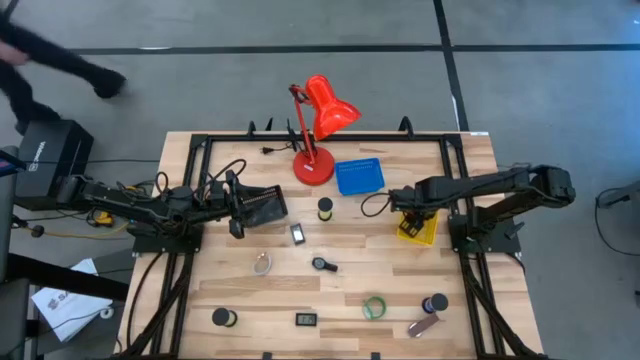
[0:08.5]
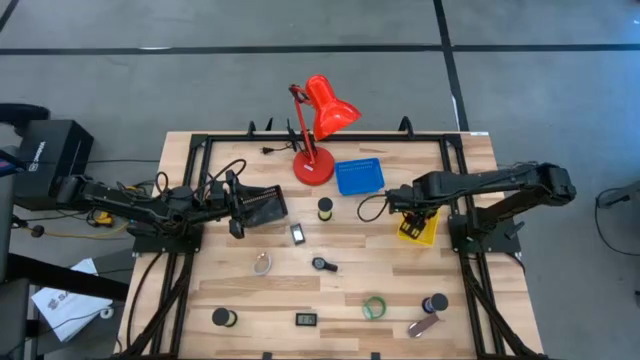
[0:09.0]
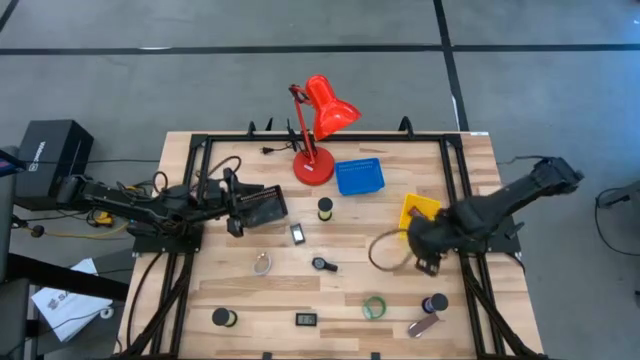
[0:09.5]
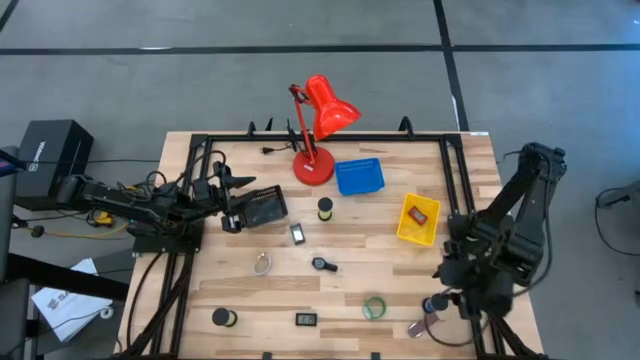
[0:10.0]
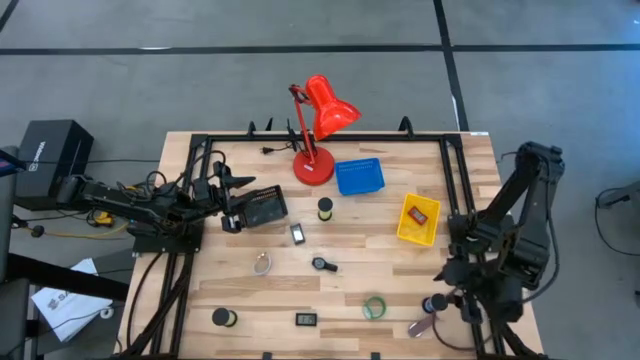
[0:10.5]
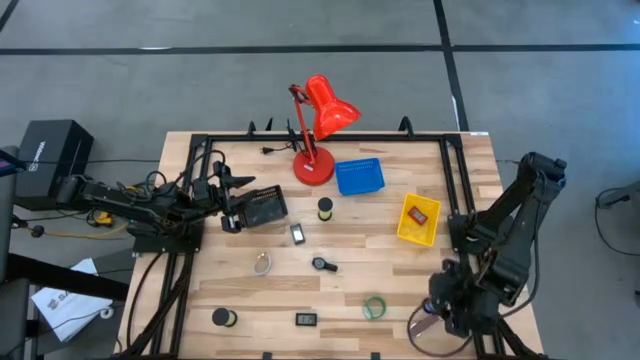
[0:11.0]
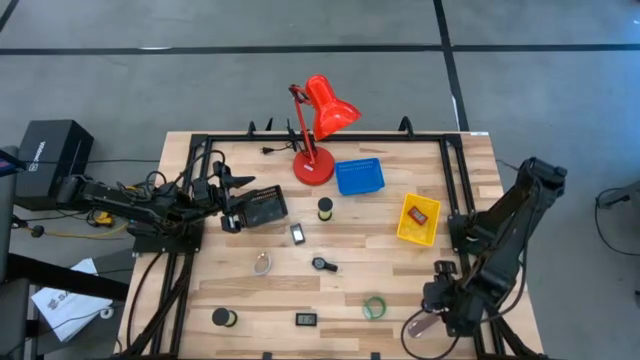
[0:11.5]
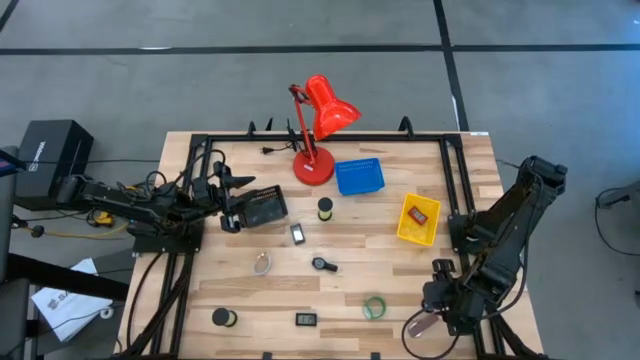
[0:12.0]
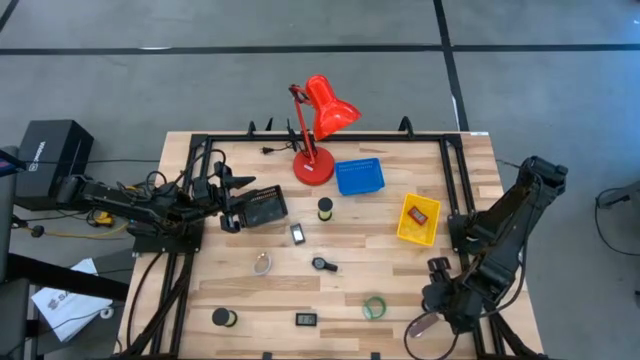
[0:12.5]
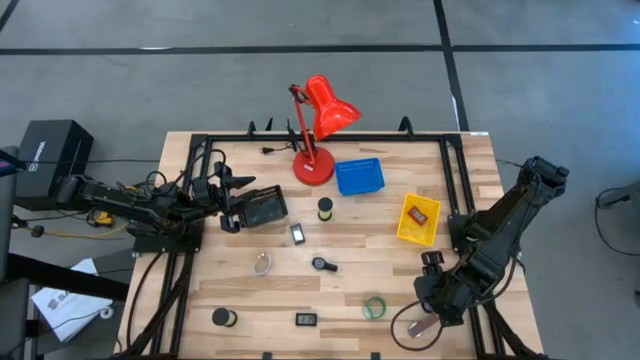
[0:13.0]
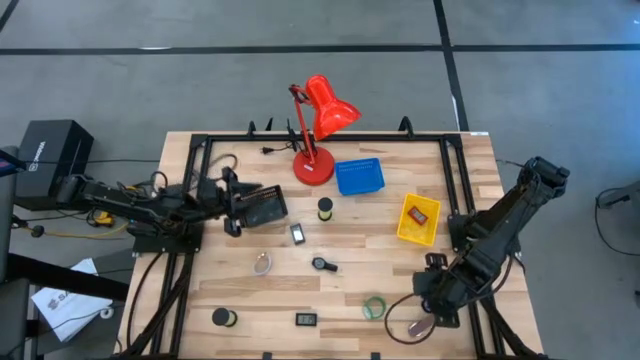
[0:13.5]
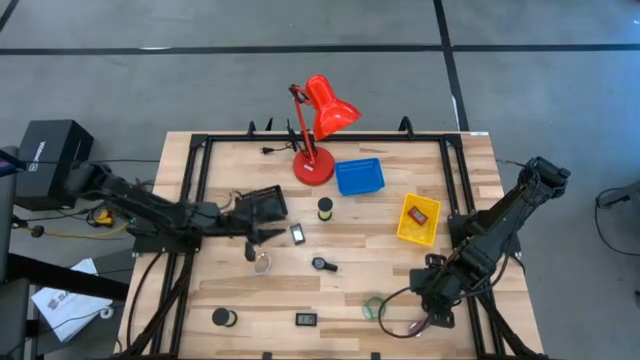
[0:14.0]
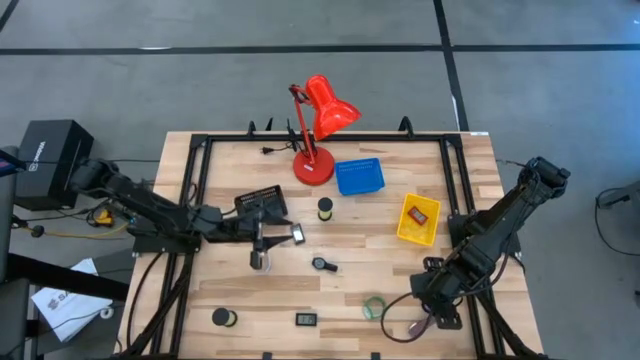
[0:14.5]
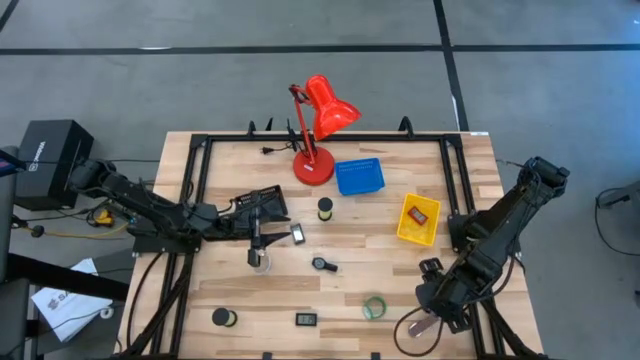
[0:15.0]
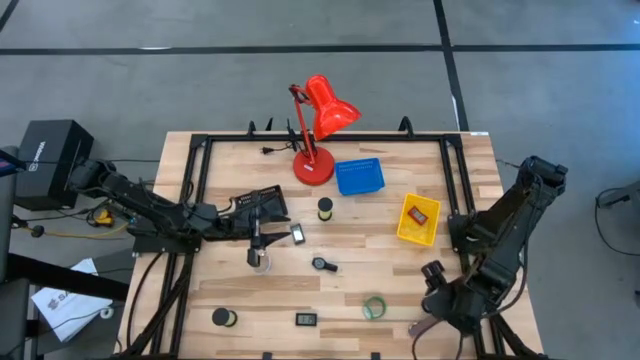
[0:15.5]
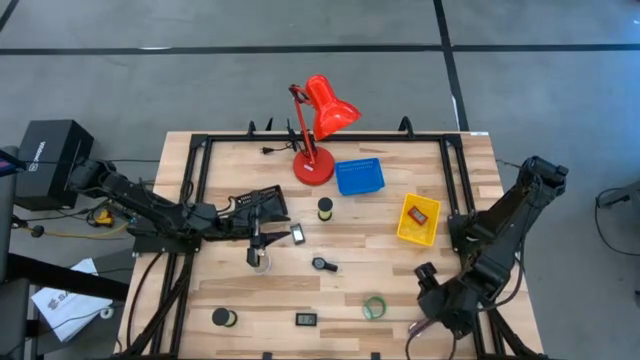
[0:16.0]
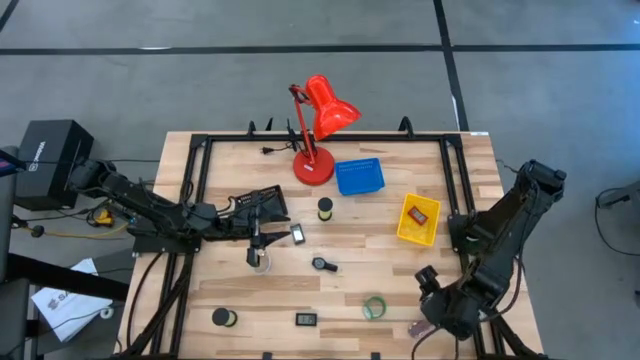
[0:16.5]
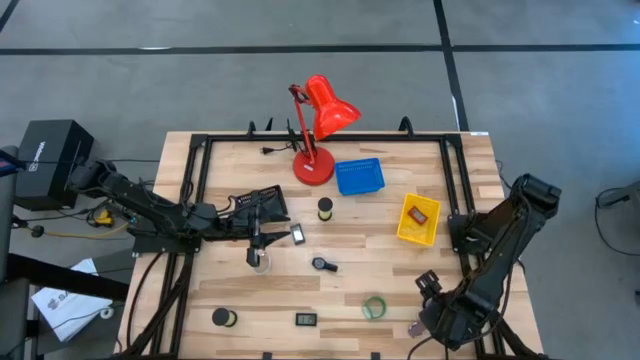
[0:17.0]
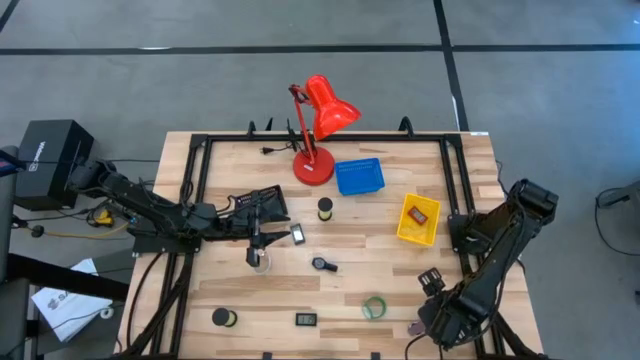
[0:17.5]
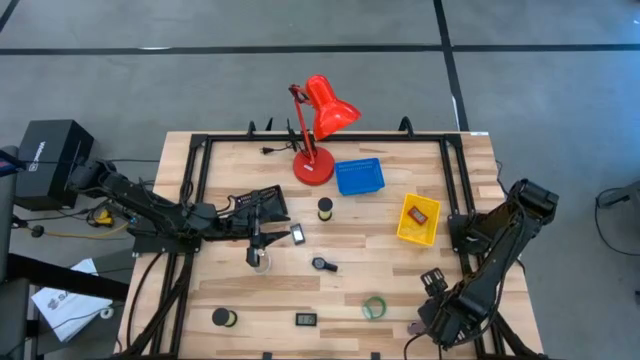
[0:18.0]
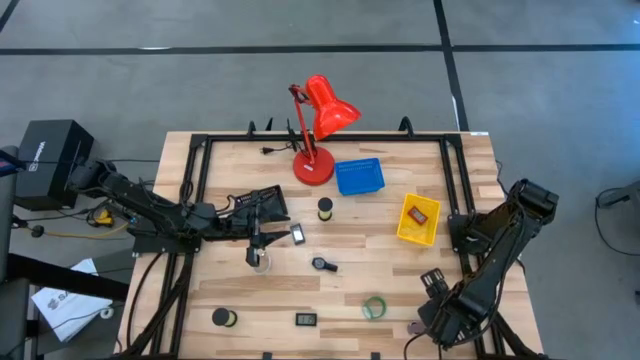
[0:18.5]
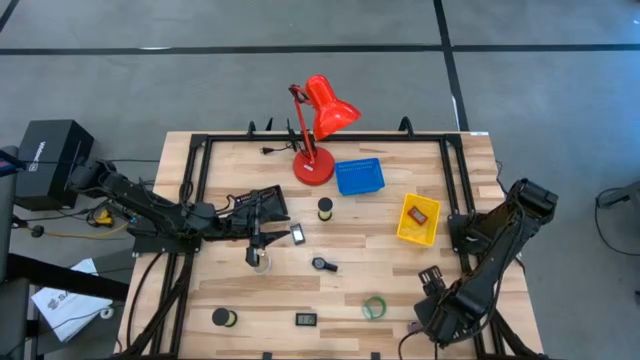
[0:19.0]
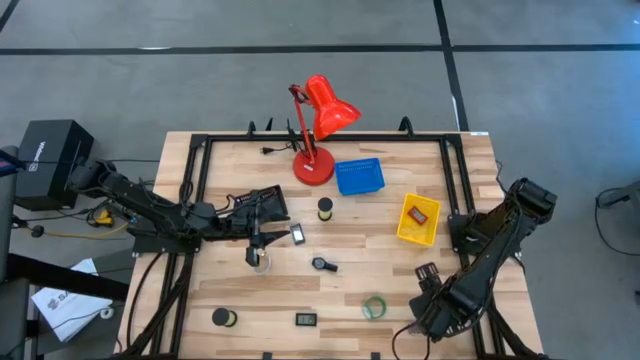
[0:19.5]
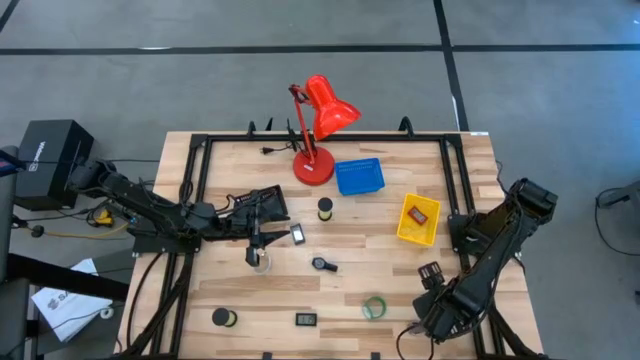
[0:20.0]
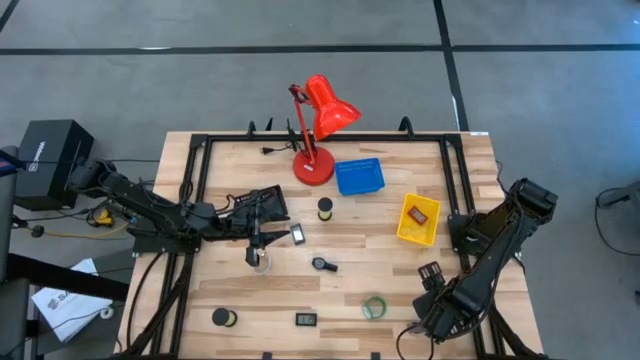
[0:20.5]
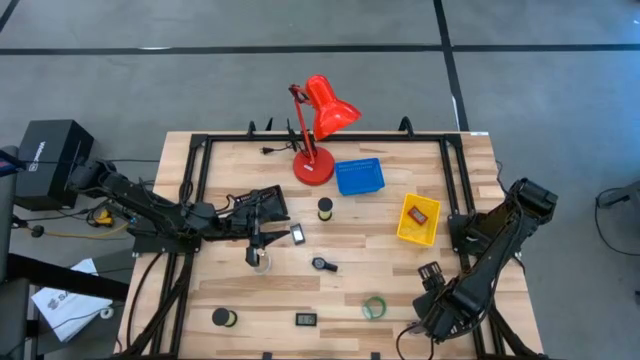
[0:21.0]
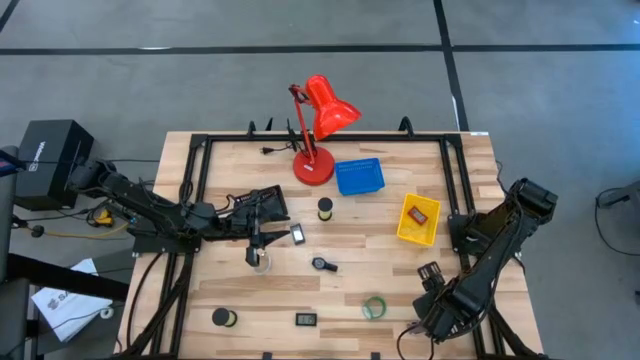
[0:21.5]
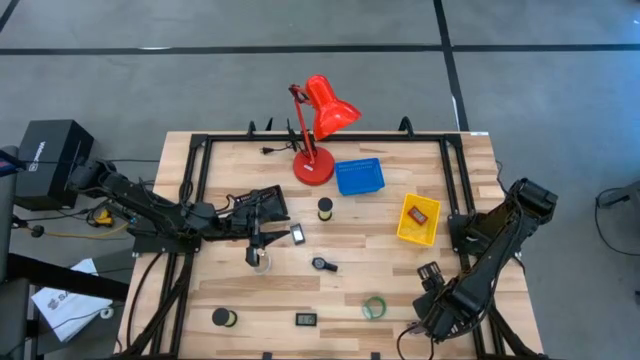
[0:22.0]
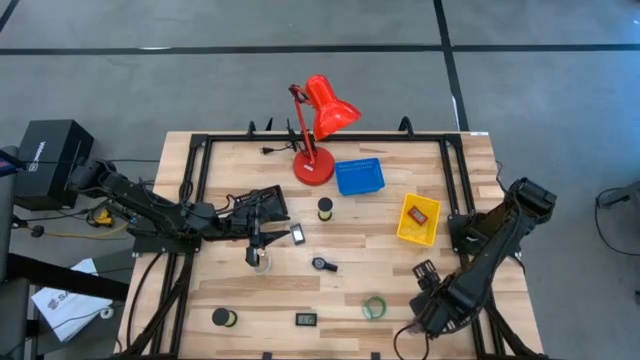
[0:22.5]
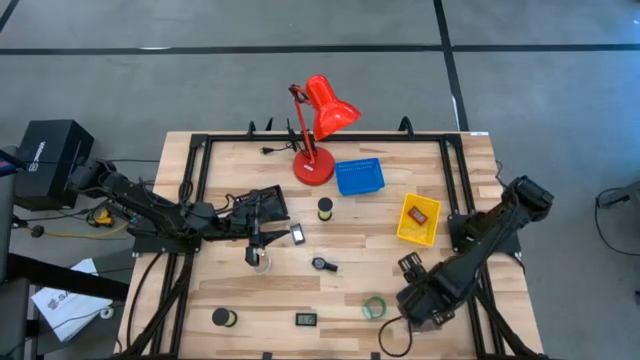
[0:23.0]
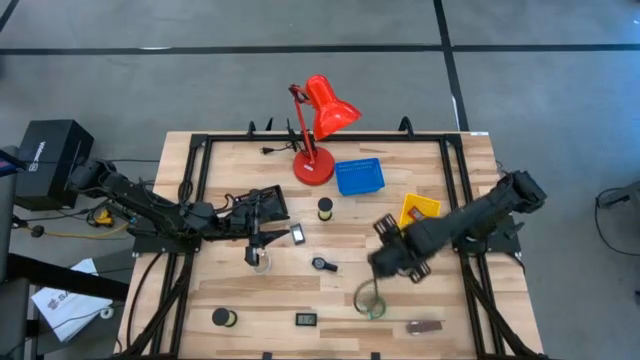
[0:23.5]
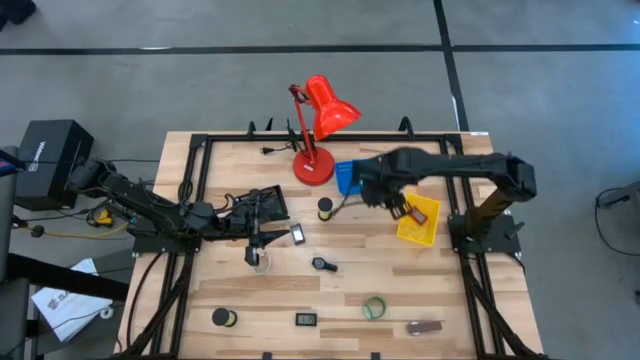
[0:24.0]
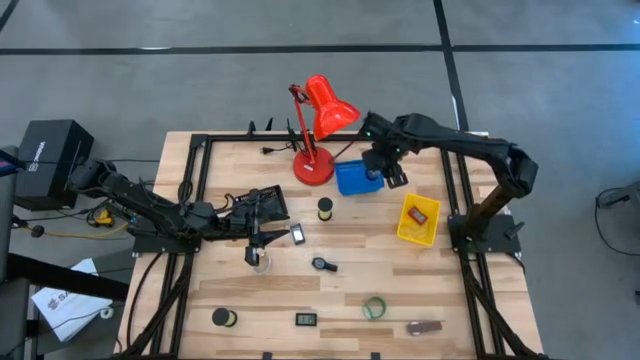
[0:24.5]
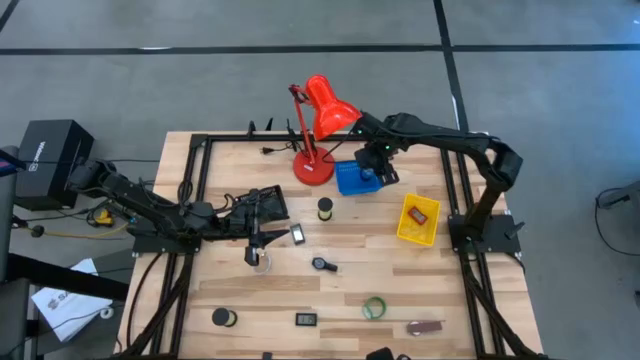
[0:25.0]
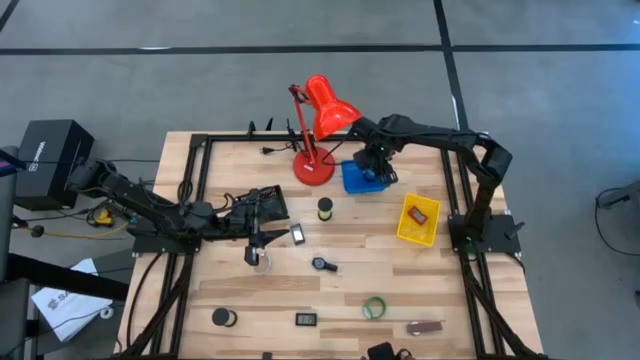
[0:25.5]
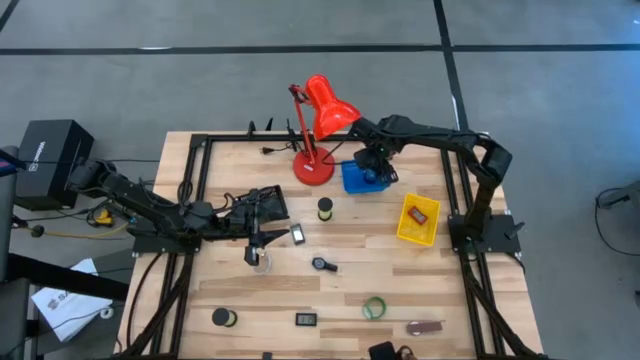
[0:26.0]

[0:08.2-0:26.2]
Task: Pick & Place Office items
Put the blue hourglass into the blue basket
